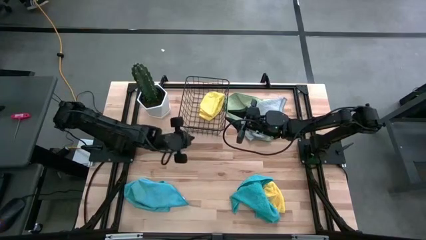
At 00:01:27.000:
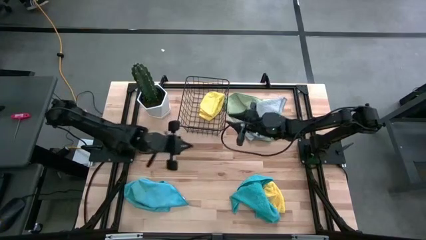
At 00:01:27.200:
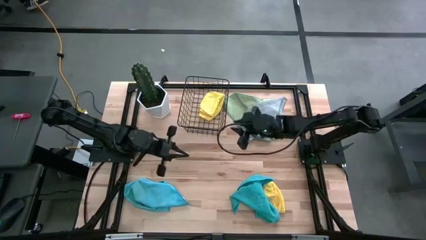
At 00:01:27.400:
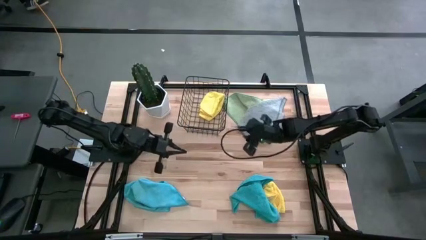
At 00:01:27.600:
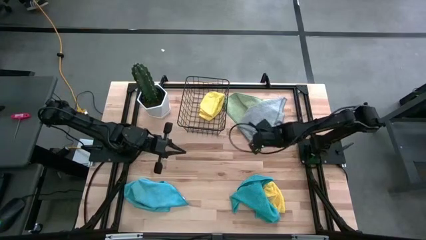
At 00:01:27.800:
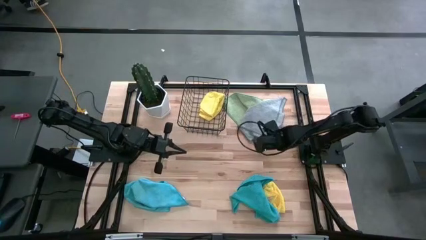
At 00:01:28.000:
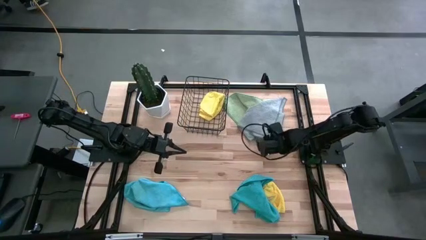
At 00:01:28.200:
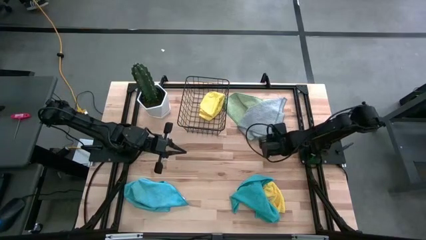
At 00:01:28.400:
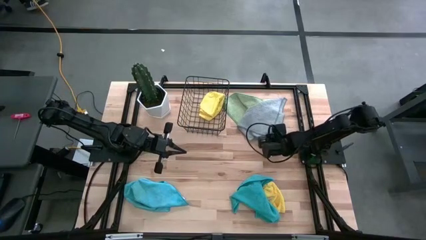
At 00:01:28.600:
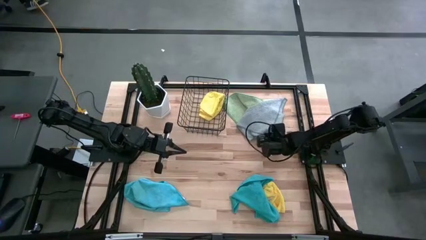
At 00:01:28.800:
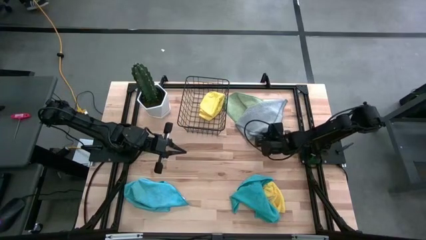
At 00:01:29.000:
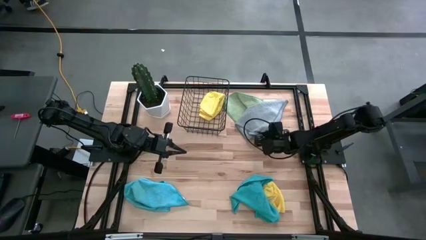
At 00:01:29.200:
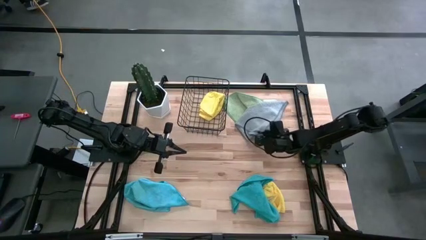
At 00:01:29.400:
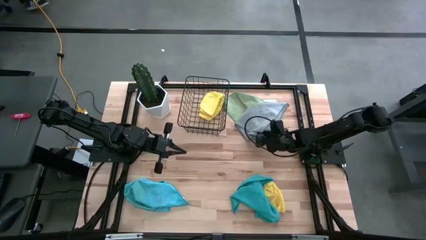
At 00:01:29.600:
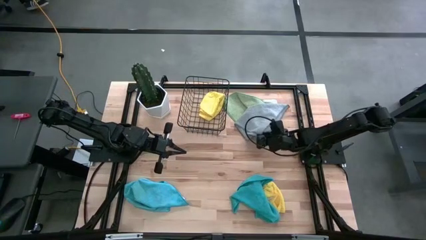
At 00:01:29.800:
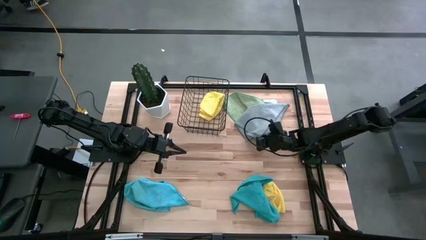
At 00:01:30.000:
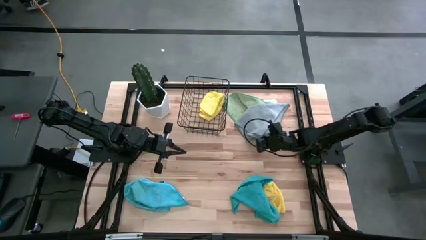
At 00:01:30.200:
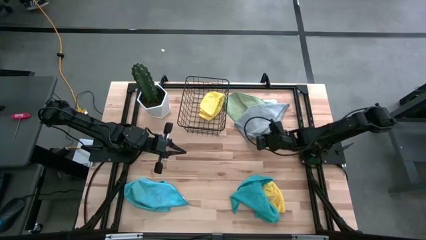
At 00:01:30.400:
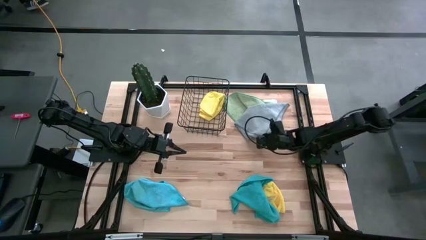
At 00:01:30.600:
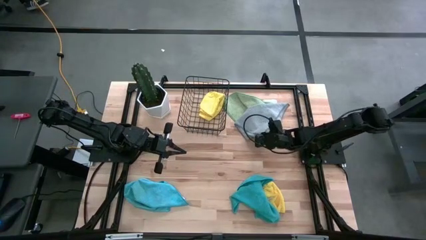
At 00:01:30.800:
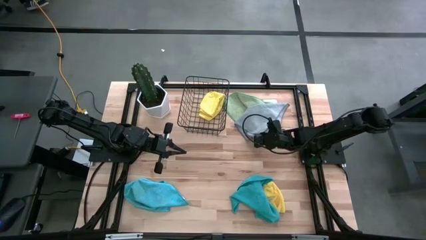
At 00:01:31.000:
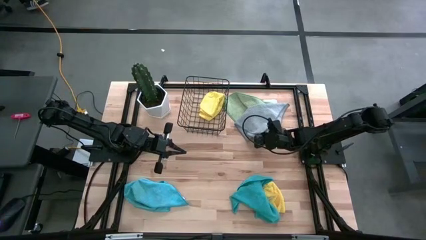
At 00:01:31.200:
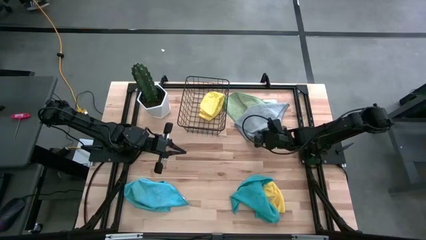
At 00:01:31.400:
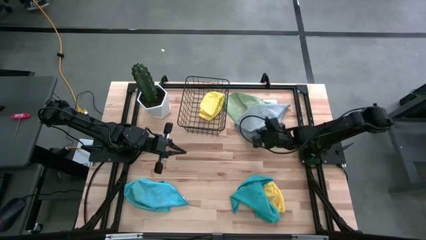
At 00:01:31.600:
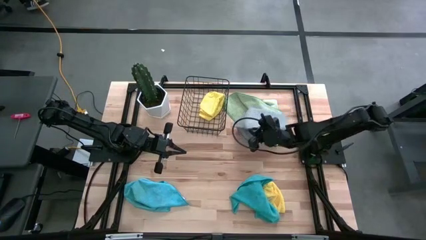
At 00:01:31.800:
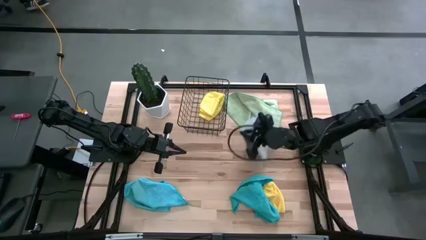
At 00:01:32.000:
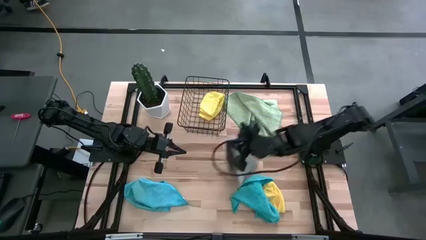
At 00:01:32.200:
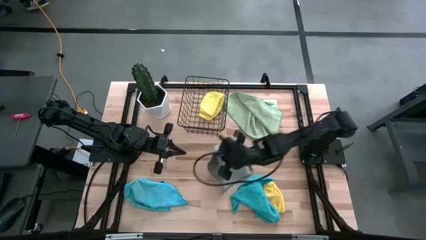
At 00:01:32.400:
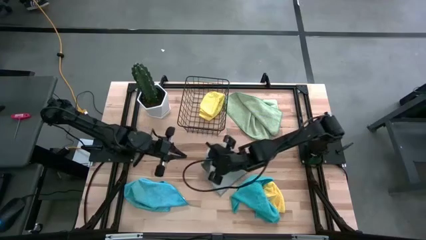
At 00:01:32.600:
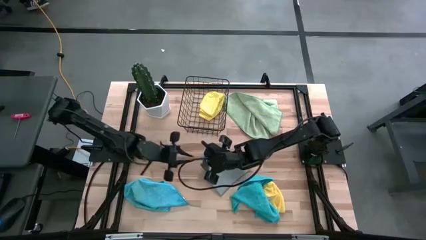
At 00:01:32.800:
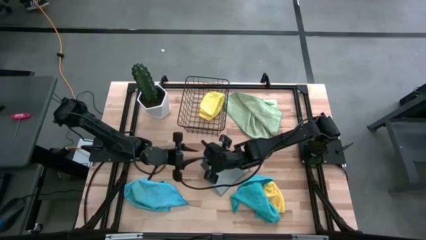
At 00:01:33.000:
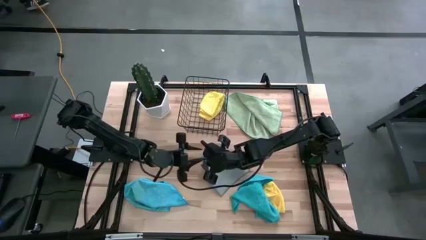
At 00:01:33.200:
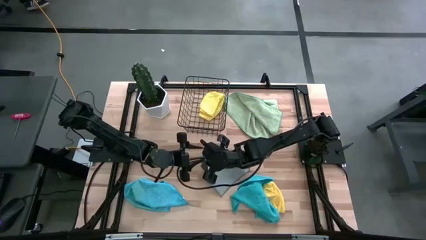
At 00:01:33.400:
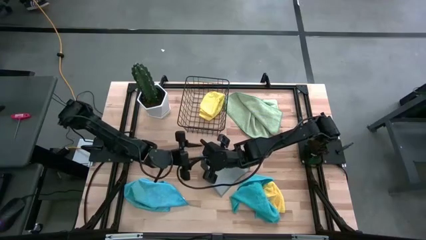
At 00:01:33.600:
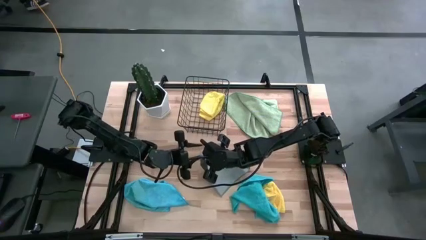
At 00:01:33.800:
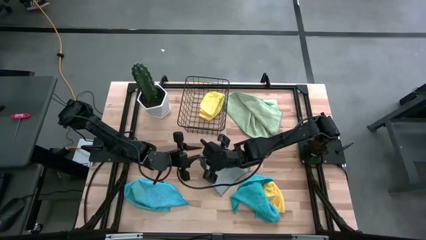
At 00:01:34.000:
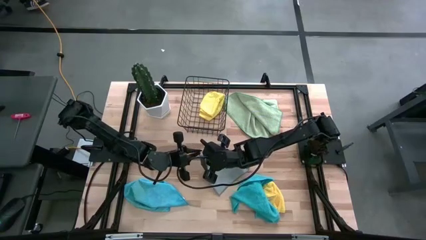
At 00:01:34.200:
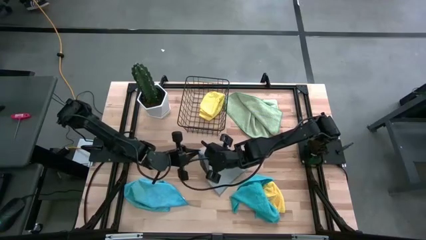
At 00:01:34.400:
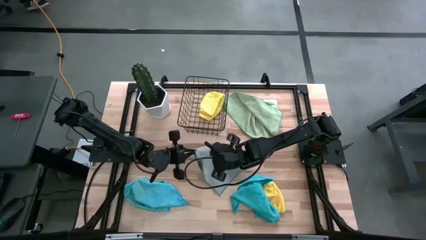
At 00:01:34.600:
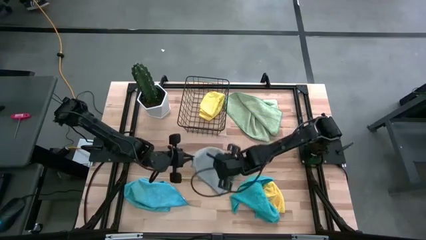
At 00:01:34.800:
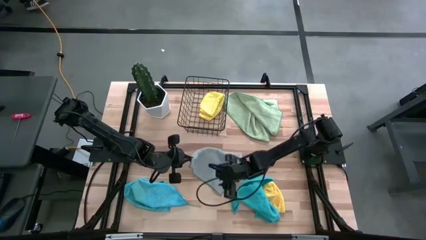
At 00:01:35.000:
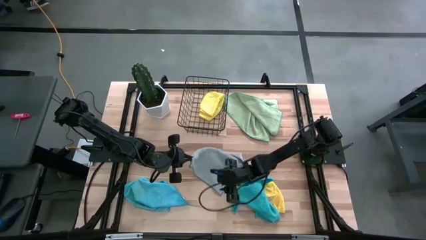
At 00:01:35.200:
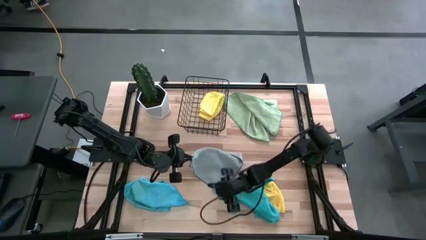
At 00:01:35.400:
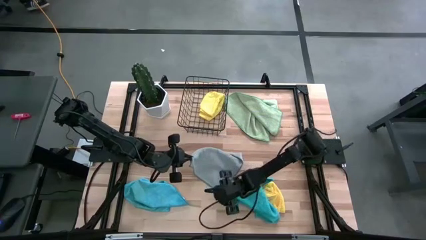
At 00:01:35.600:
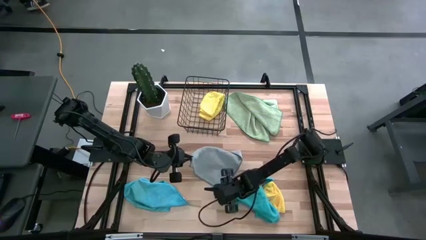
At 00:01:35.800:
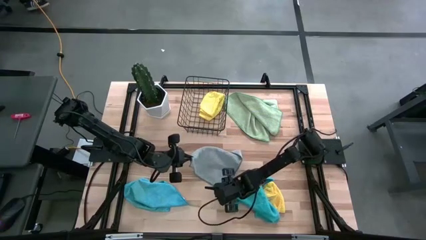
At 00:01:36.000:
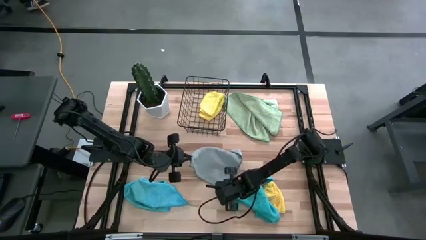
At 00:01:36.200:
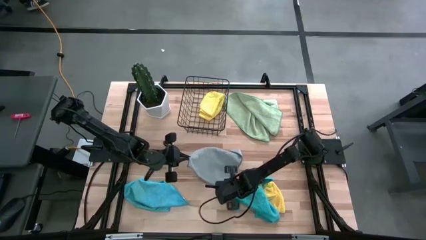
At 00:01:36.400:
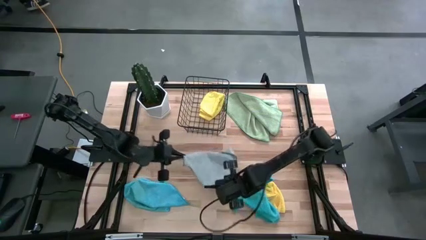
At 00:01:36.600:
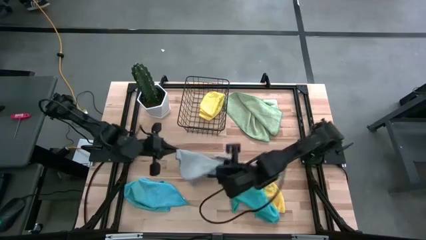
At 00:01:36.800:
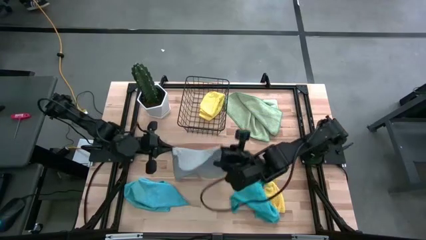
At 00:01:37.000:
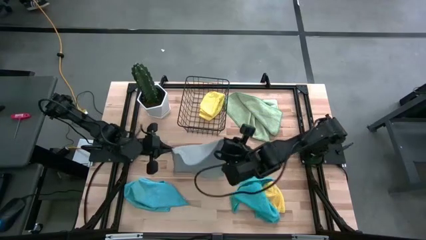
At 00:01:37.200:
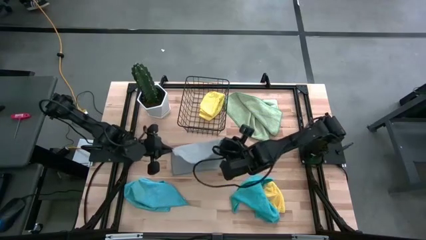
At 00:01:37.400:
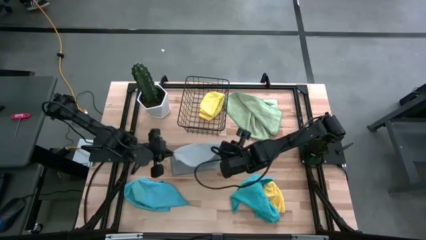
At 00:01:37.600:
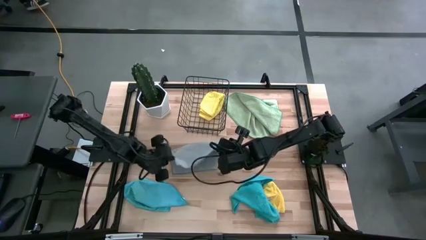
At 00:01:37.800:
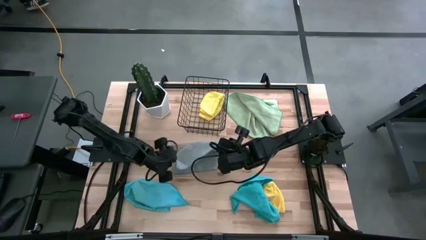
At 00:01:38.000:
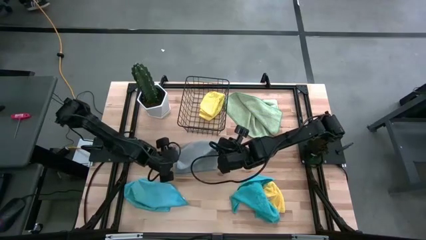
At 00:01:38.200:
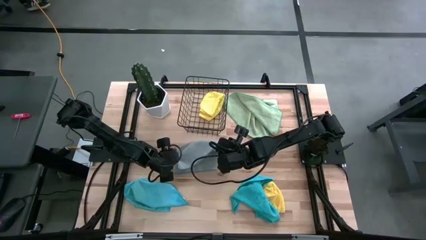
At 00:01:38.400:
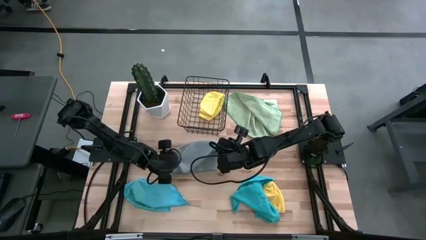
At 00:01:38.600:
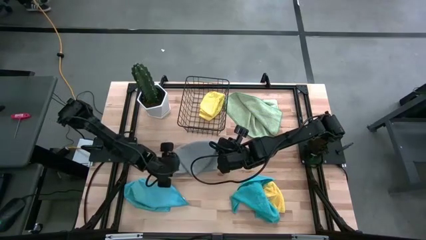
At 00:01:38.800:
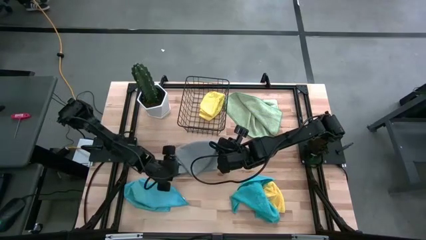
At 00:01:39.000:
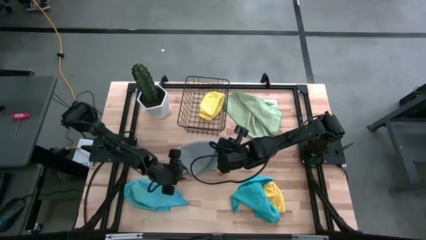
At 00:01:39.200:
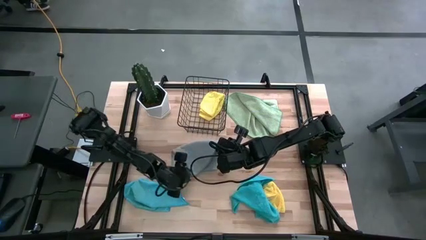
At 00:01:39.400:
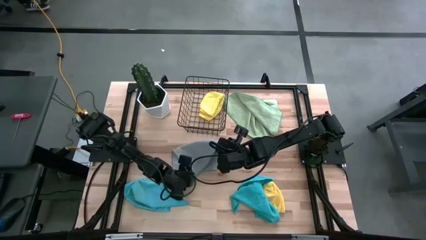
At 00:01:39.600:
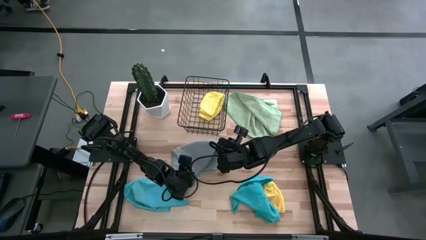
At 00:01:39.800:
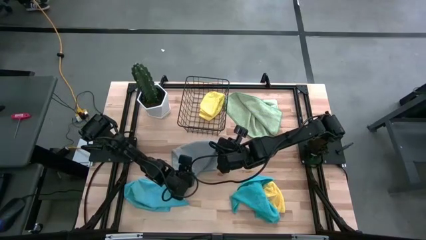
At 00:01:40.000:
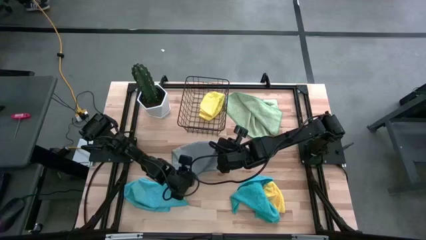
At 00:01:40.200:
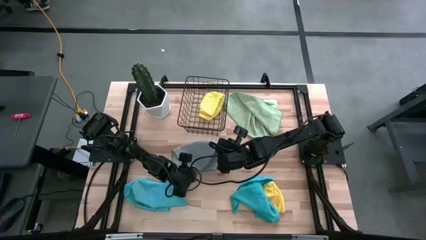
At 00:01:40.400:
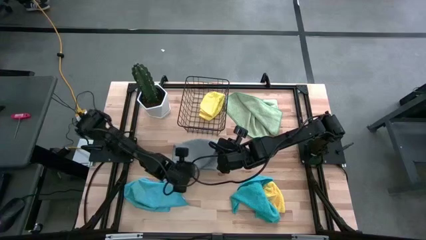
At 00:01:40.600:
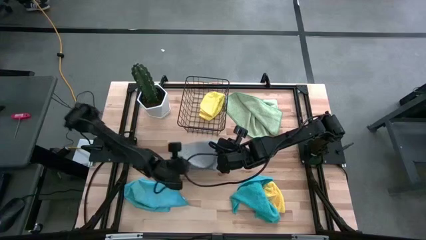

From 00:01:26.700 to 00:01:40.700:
Task: Fold microfiber towels
Fold the gray microfiber cloth

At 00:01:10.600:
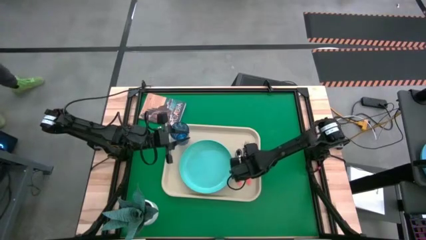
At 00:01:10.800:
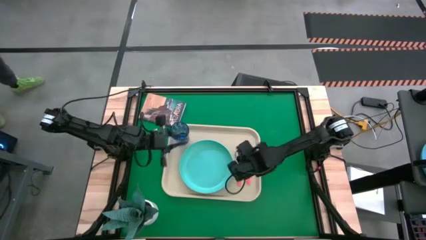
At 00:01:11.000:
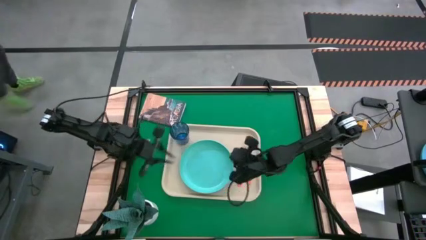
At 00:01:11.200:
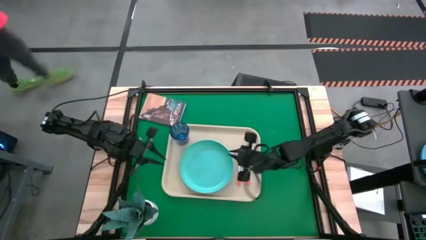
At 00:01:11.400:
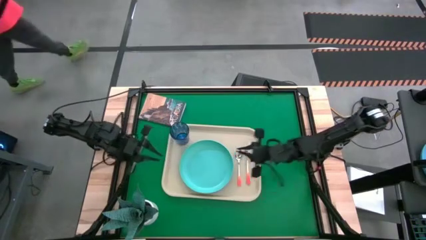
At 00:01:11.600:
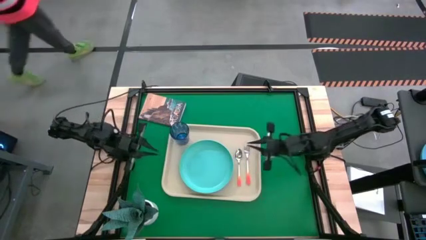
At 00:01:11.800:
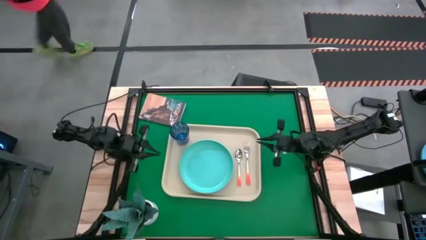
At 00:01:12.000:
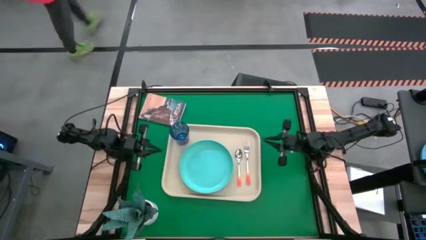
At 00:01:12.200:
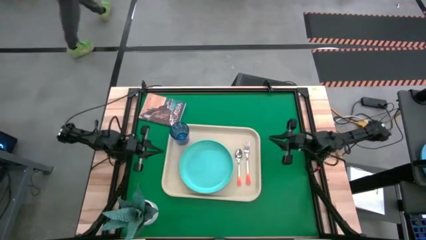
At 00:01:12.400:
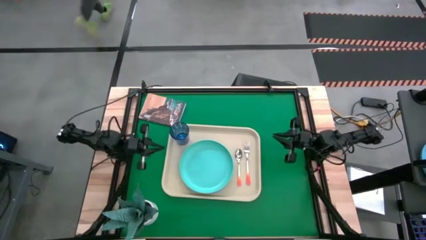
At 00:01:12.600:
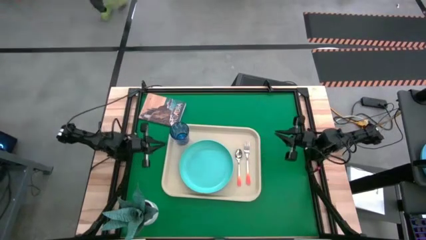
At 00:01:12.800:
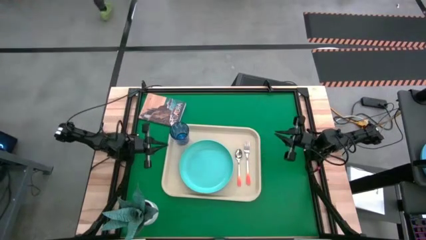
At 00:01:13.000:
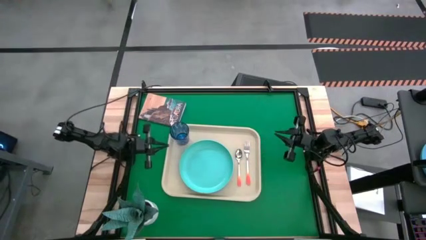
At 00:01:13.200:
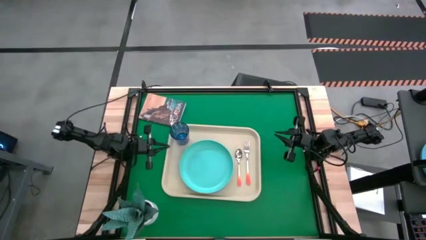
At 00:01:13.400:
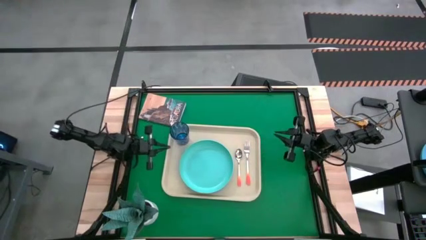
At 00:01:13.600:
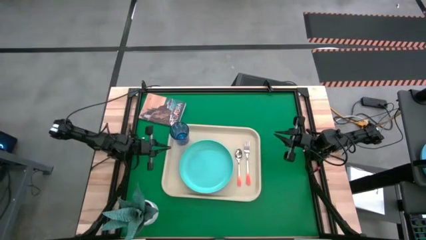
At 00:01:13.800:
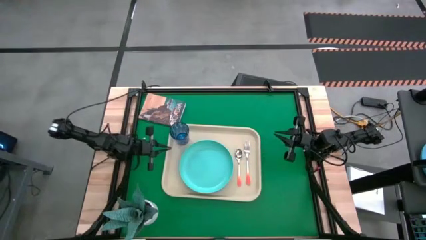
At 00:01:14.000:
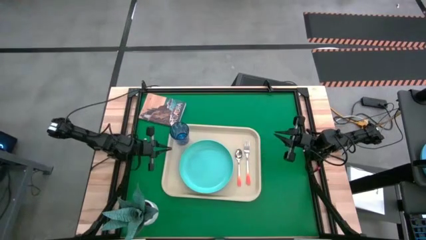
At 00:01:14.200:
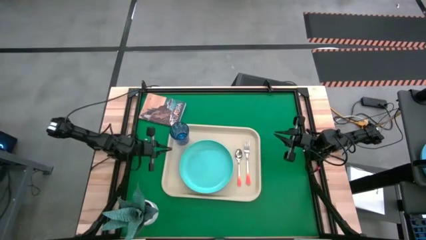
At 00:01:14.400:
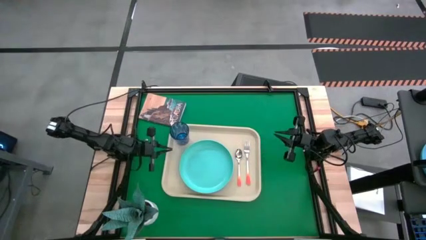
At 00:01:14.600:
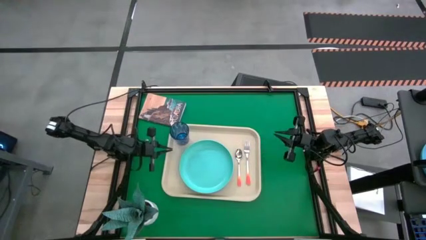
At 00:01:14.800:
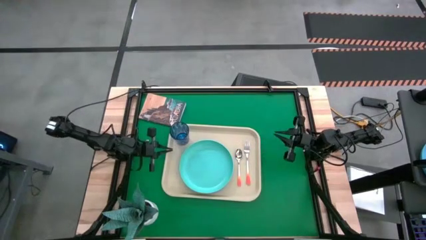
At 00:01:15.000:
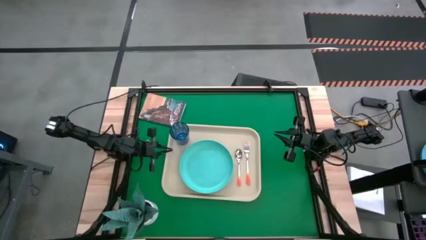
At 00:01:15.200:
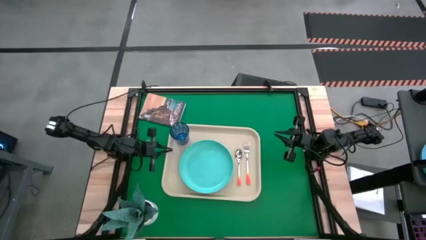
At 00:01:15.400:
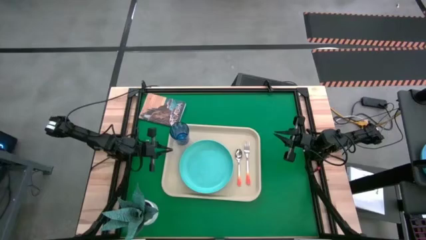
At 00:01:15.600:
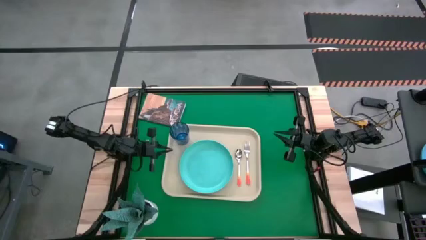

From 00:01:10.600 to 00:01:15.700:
Task: Pick and place plate/cup/fork/spoon on tray
Return to Home Position
